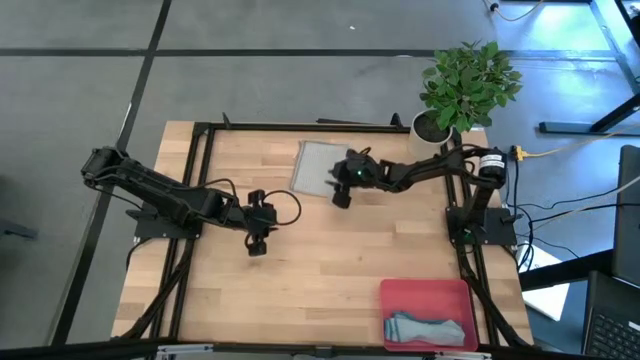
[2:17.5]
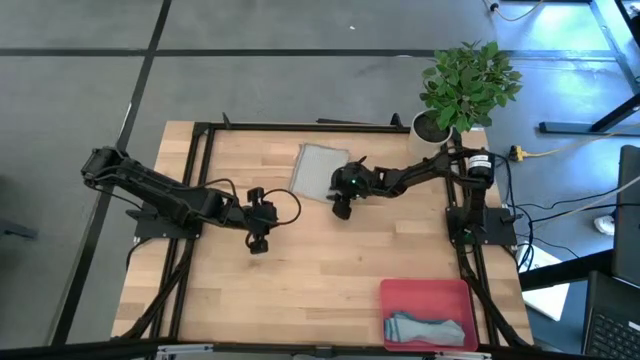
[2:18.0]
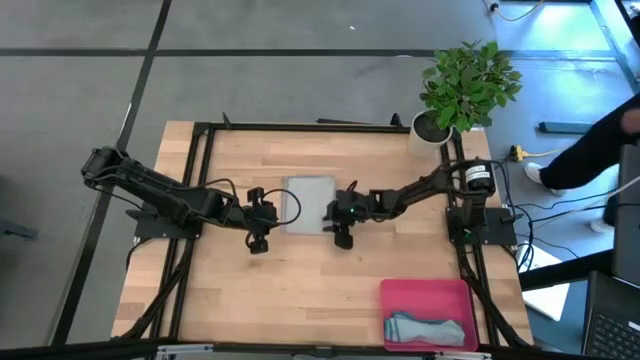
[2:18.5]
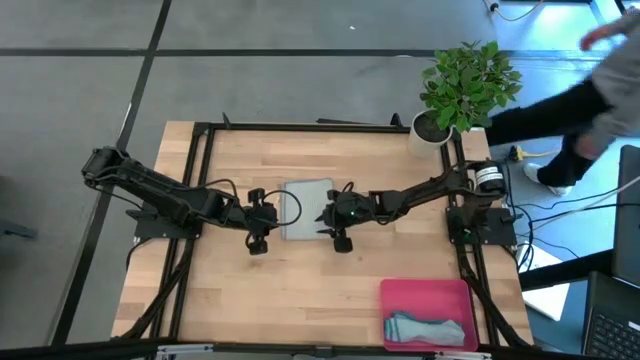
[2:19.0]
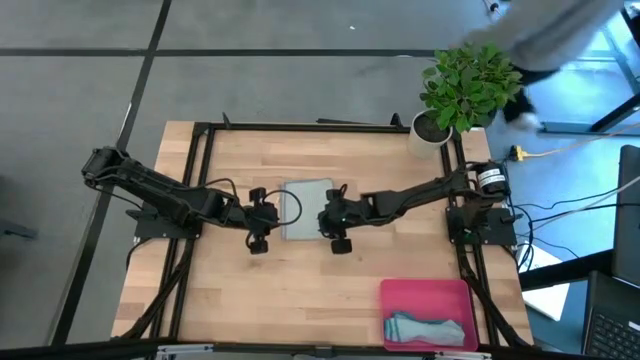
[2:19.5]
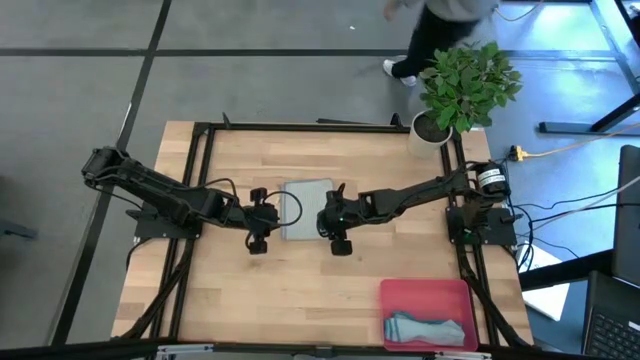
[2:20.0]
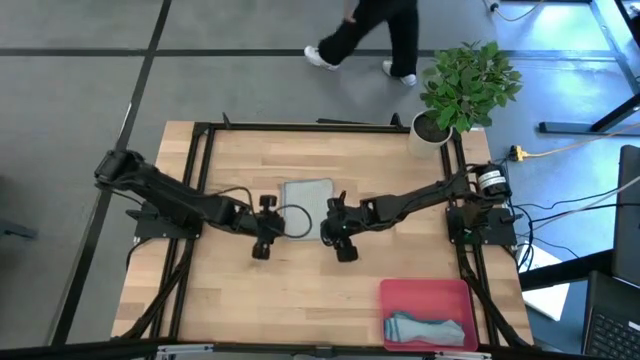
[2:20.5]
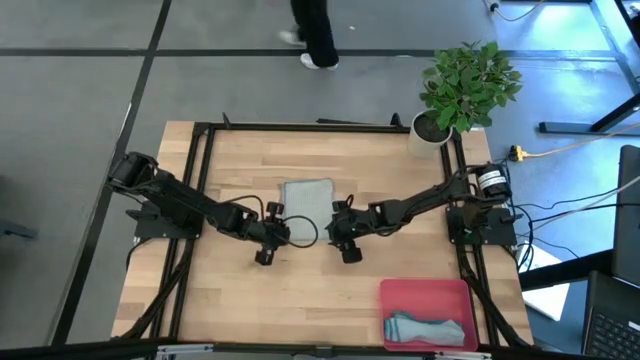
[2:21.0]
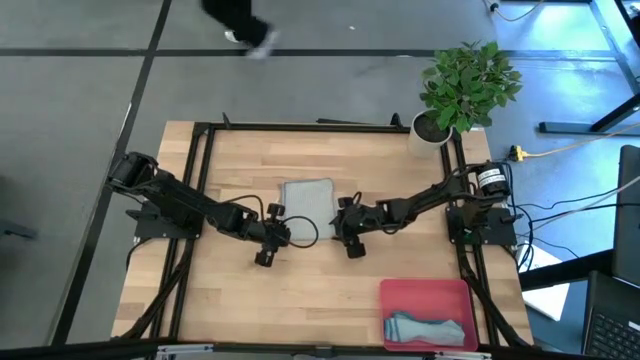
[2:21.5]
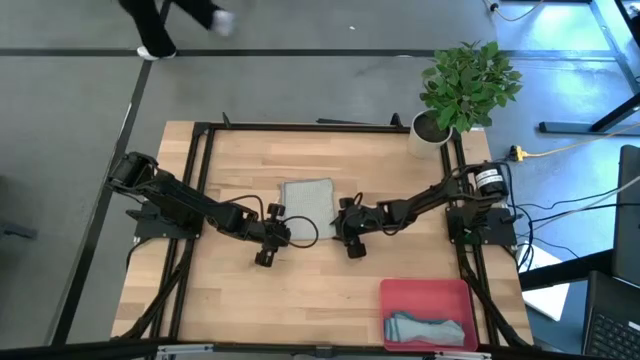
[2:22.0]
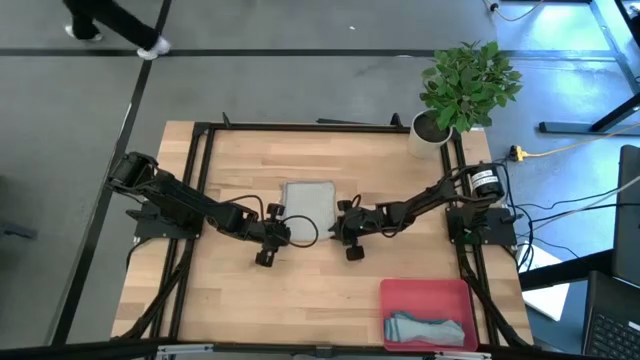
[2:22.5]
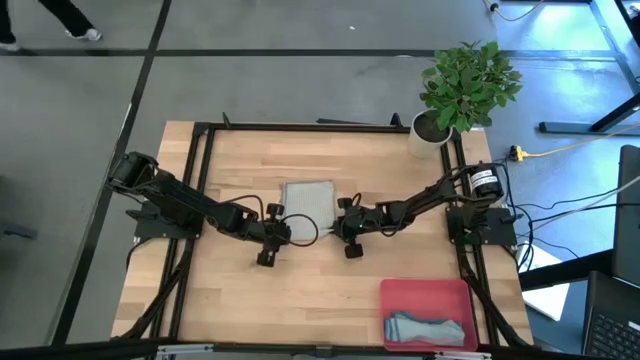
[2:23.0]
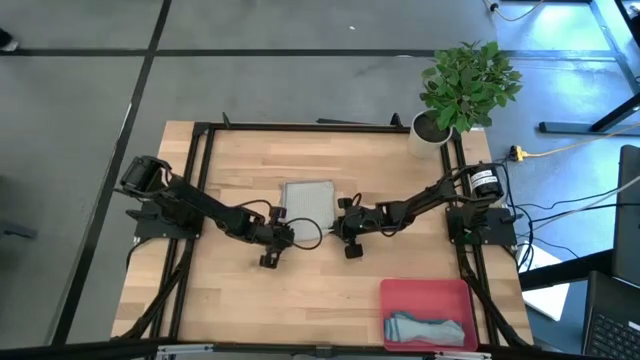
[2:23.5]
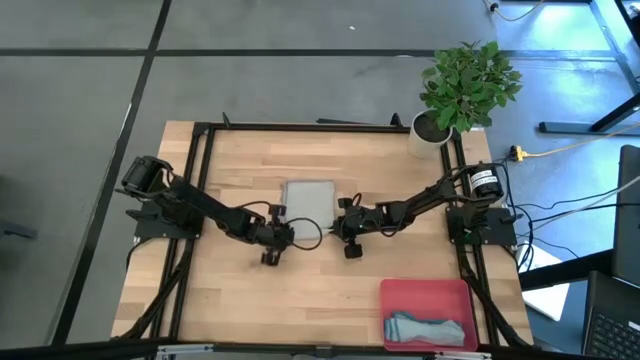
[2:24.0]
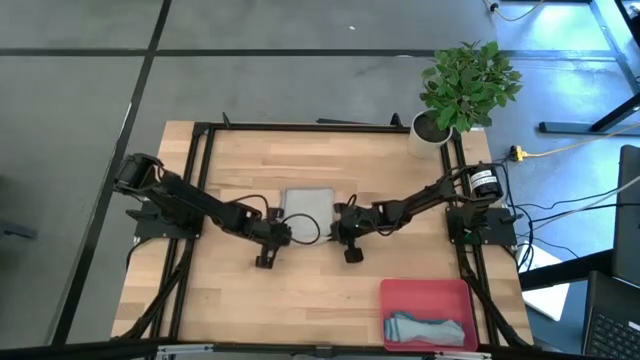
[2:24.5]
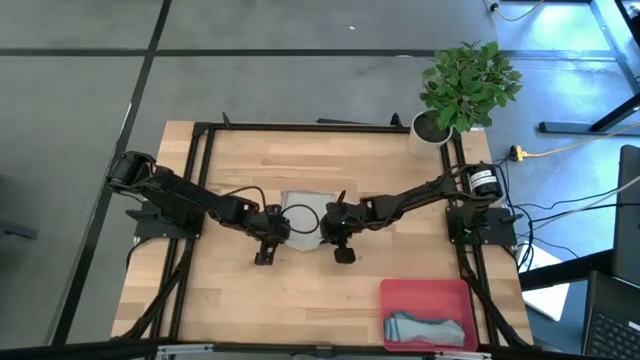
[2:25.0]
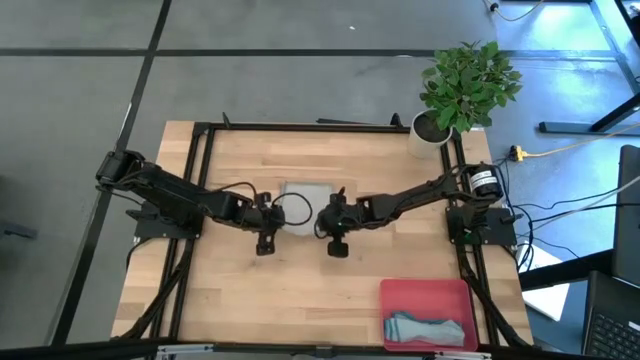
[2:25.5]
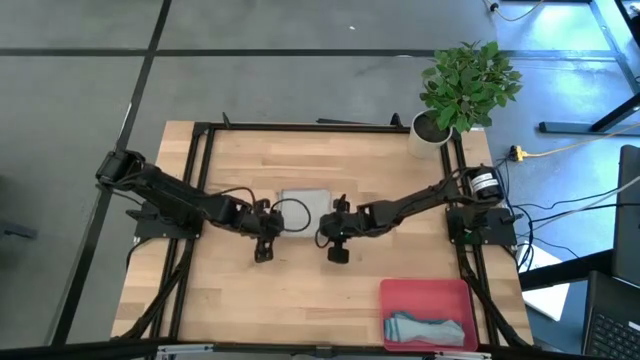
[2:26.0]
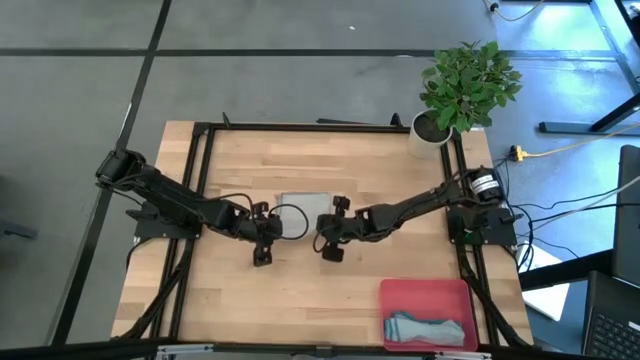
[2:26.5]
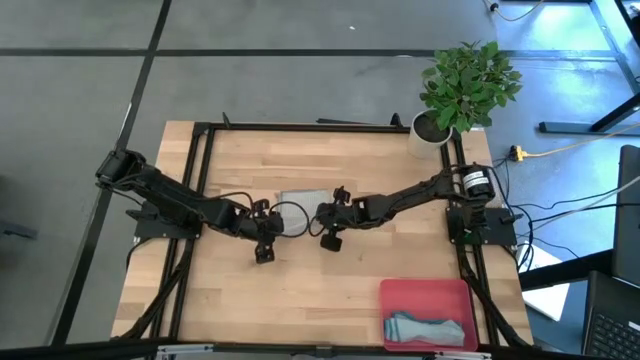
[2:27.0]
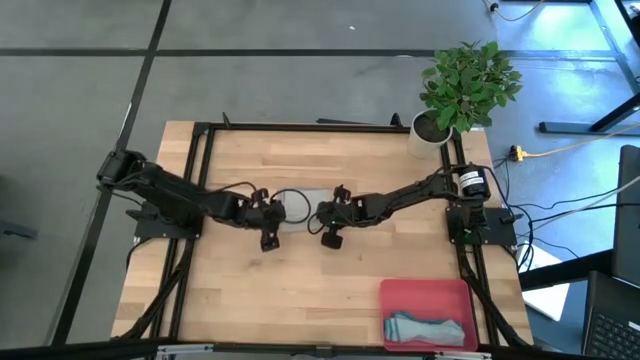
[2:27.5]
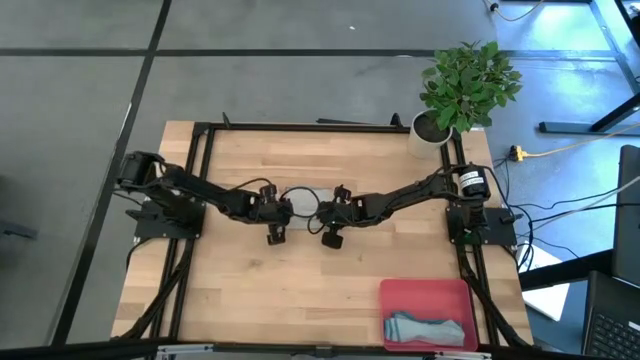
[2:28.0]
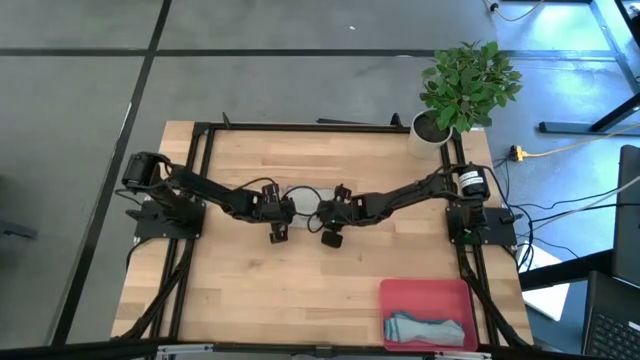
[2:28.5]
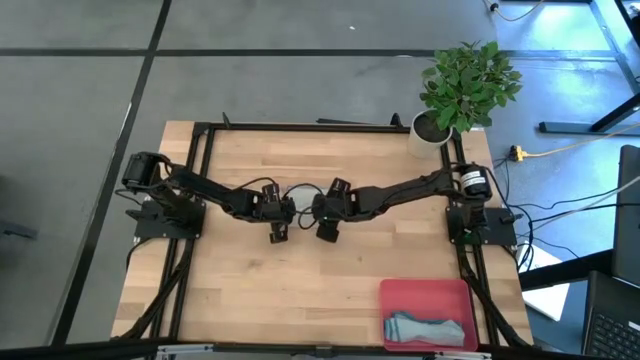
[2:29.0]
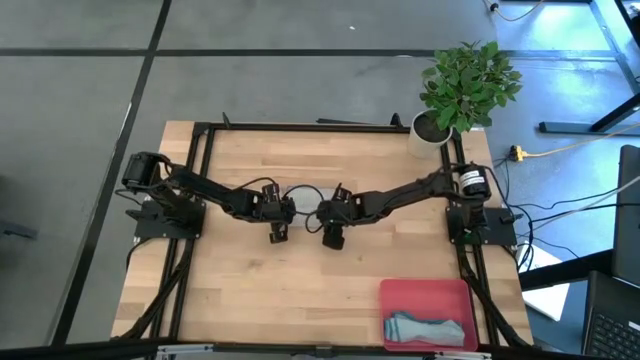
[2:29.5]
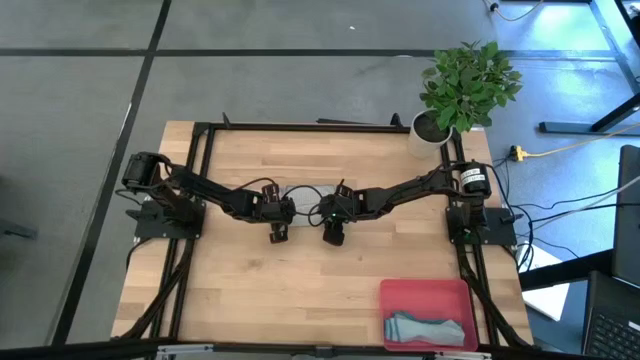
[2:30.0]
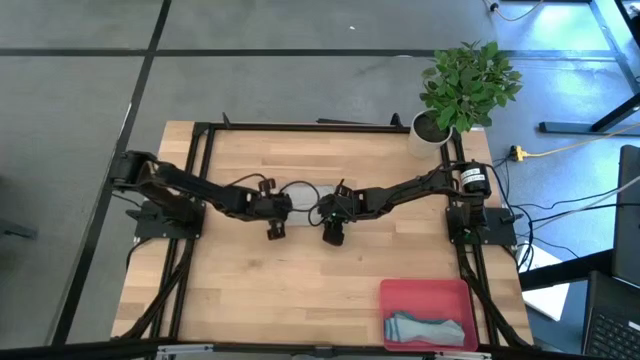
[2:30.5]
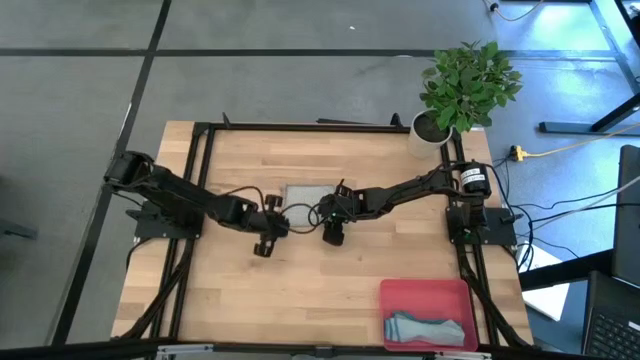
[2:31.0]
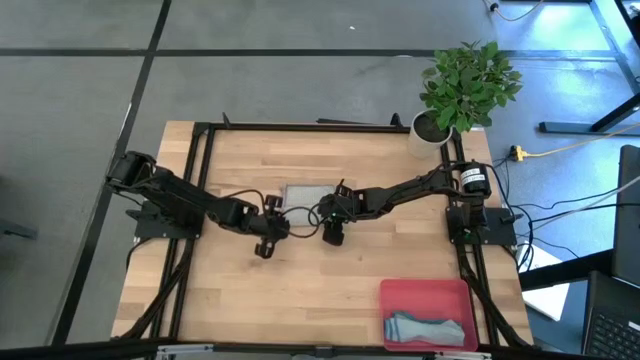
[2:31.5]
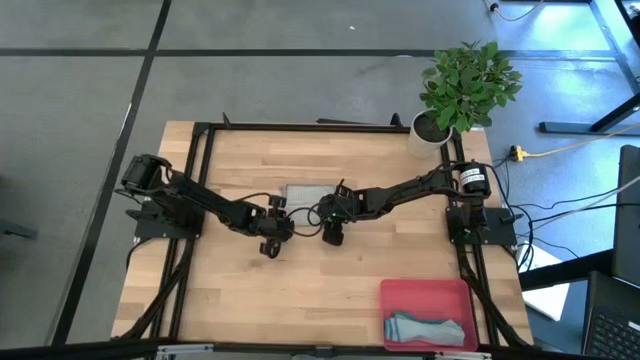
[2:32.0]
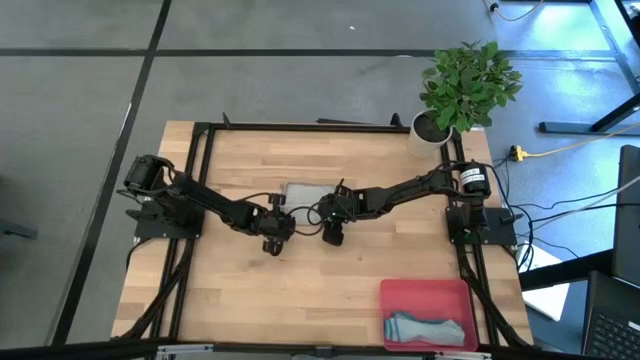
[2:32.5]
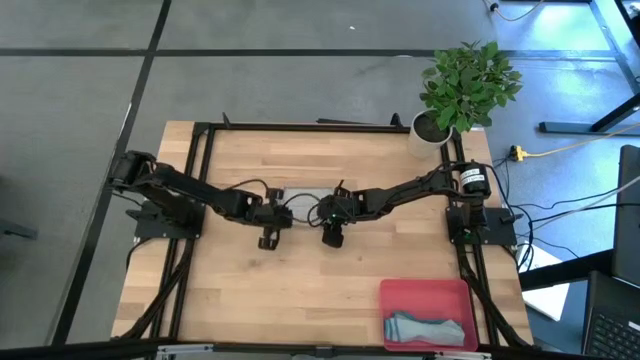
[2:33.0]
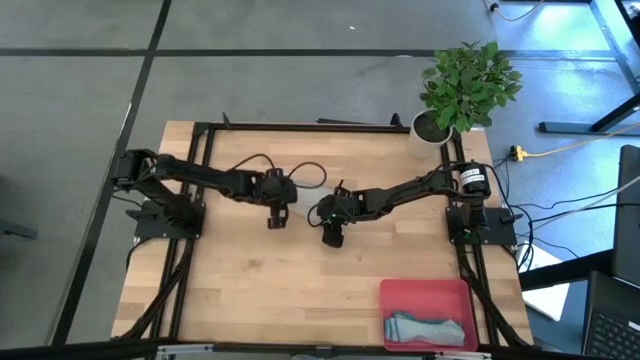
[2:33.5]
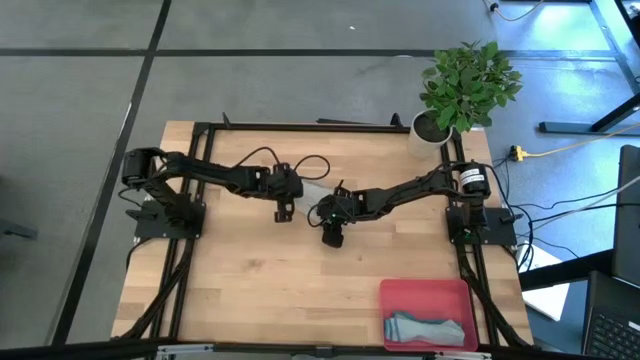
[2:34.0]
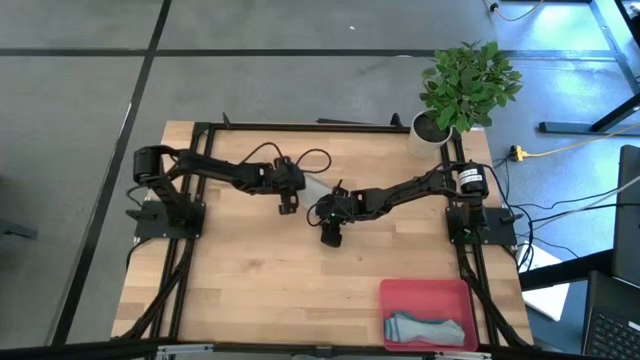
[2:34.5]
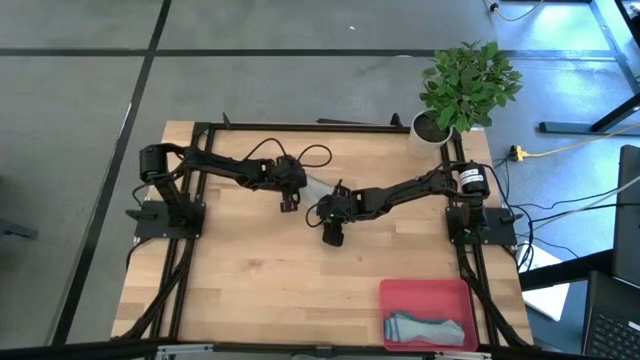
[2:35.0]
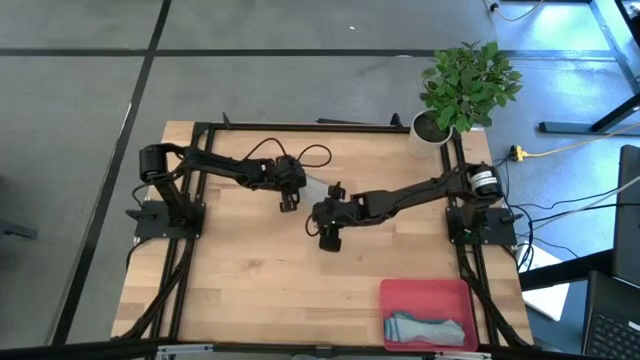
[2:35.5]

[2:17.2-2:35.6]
Task: Roll microfiber towels into tight, uniform cylinder then place into a basket
Roll the gray towel
